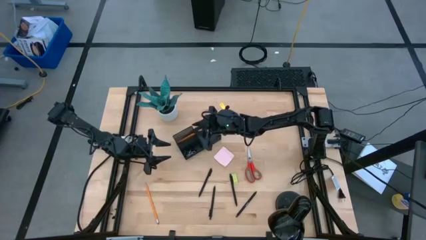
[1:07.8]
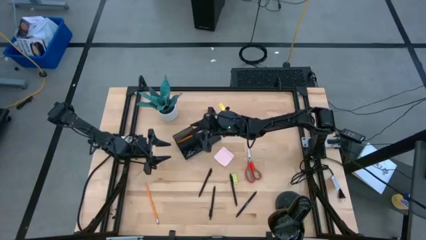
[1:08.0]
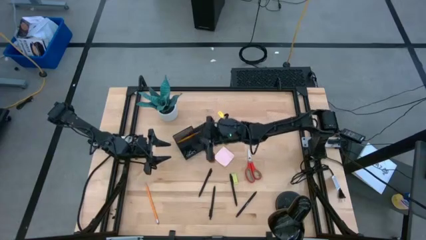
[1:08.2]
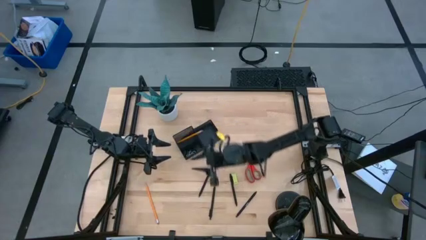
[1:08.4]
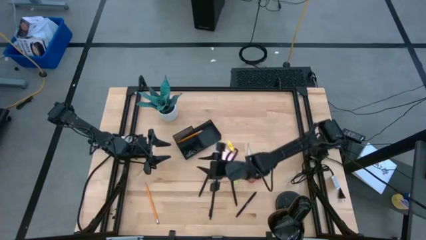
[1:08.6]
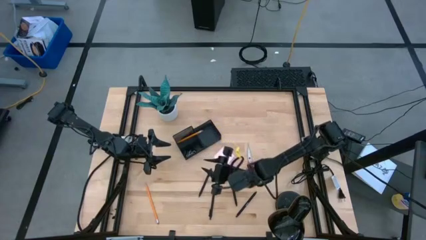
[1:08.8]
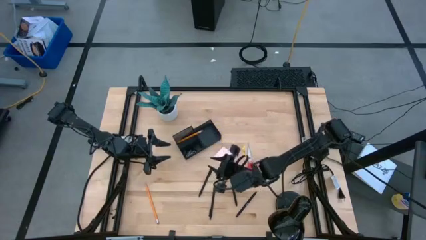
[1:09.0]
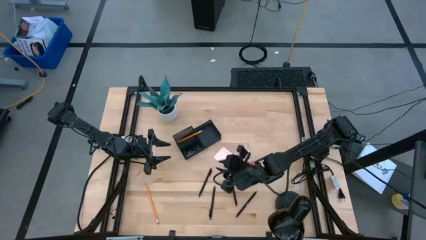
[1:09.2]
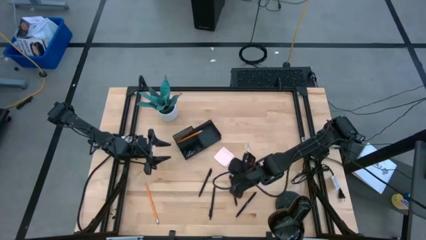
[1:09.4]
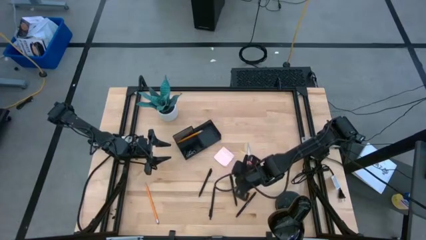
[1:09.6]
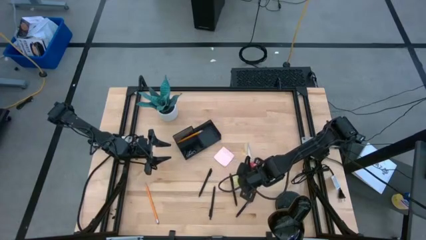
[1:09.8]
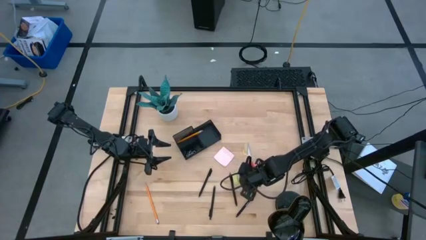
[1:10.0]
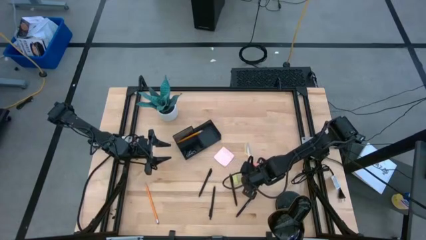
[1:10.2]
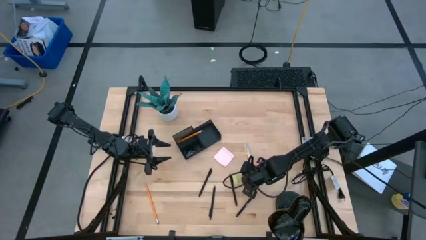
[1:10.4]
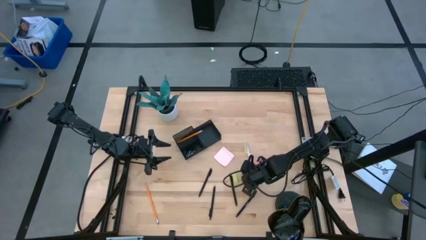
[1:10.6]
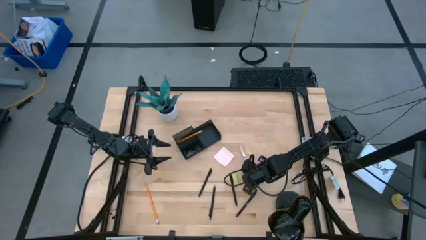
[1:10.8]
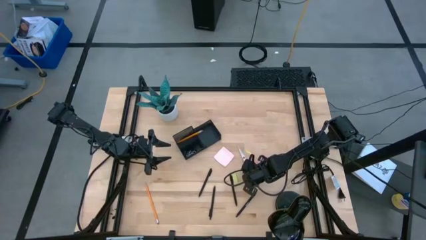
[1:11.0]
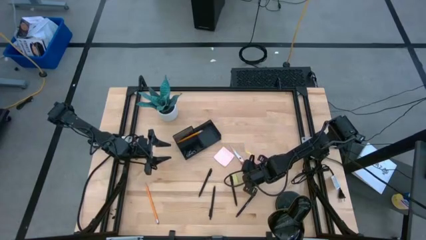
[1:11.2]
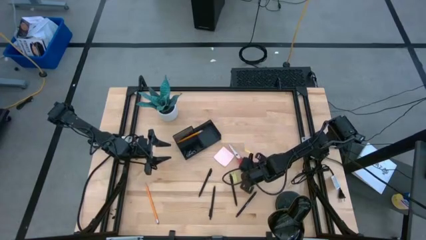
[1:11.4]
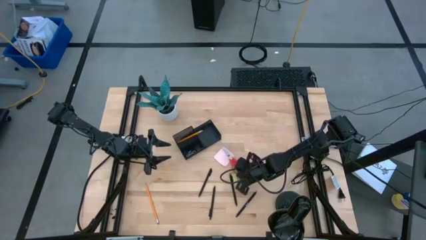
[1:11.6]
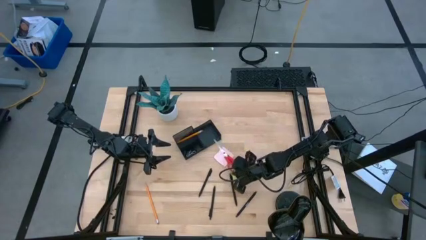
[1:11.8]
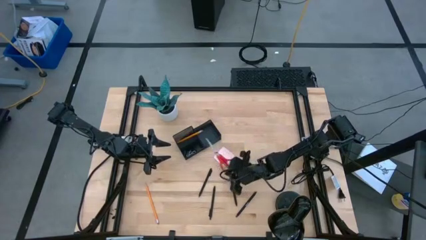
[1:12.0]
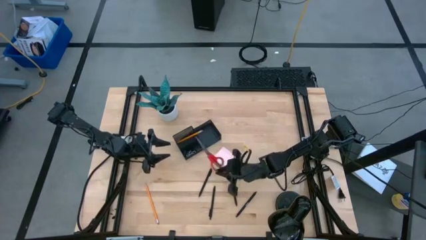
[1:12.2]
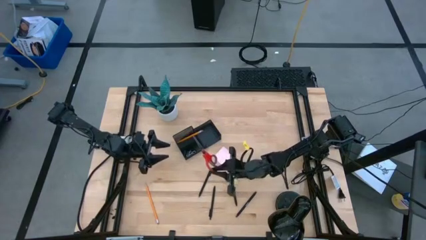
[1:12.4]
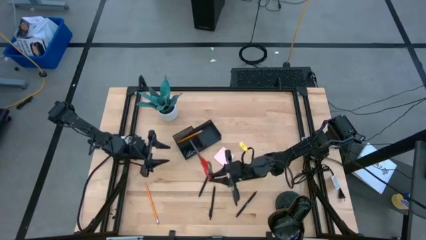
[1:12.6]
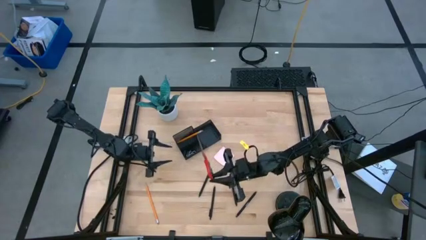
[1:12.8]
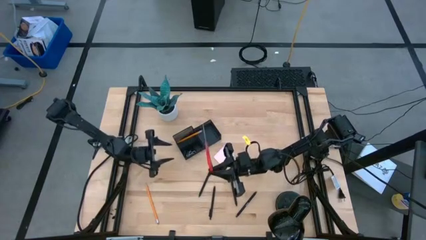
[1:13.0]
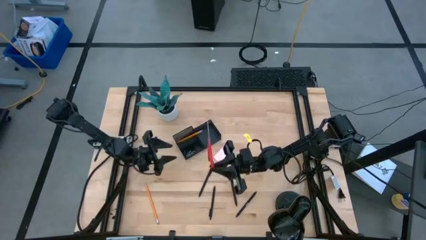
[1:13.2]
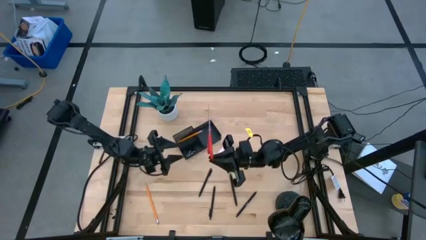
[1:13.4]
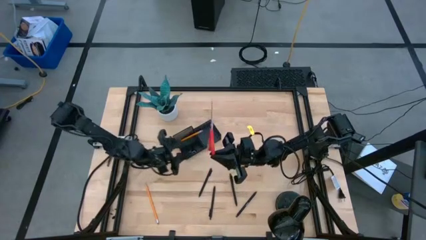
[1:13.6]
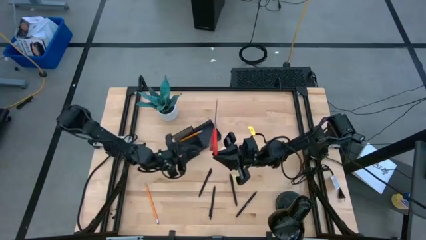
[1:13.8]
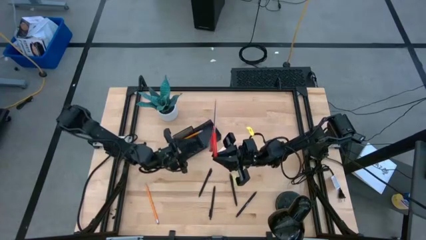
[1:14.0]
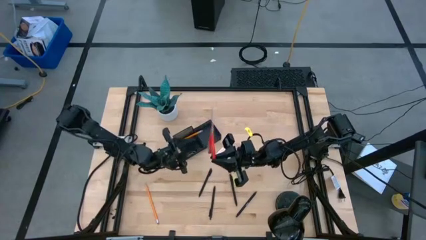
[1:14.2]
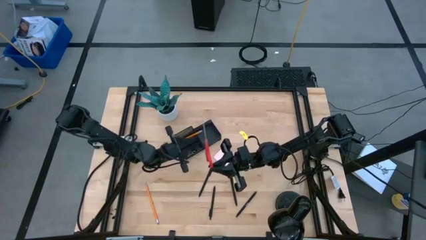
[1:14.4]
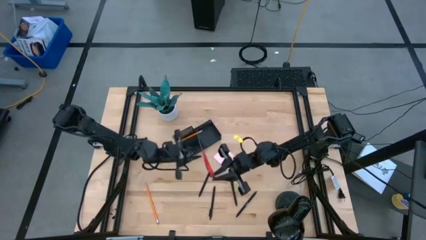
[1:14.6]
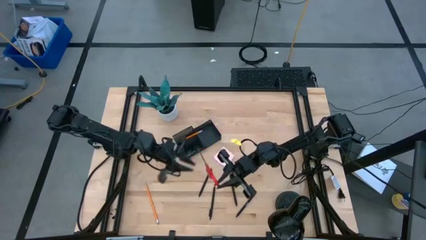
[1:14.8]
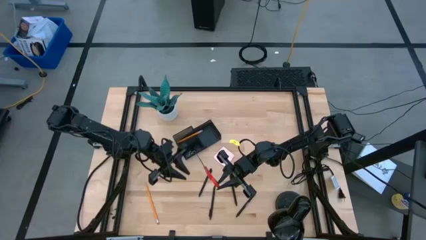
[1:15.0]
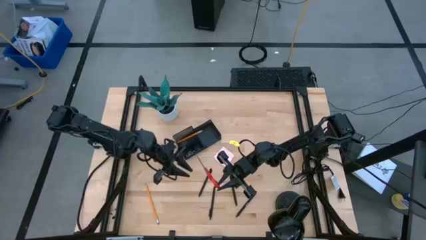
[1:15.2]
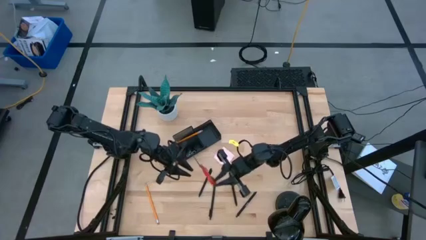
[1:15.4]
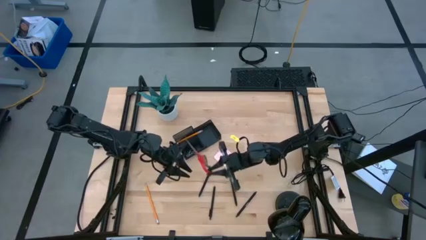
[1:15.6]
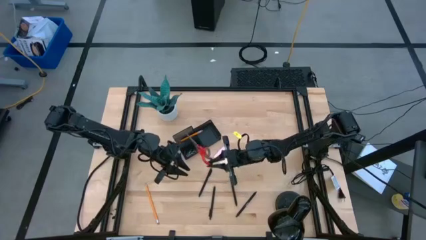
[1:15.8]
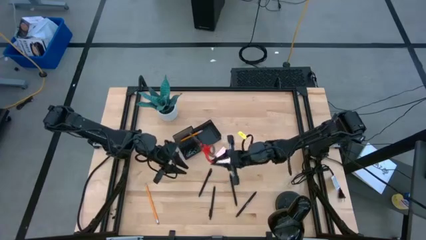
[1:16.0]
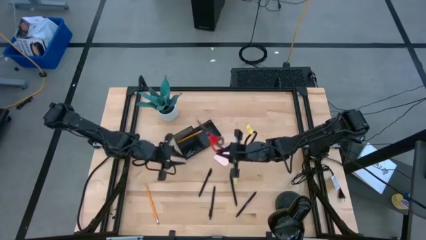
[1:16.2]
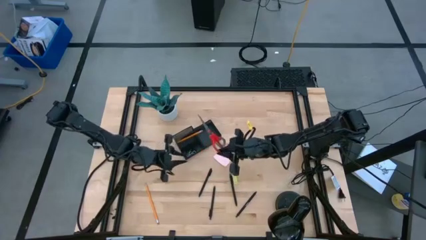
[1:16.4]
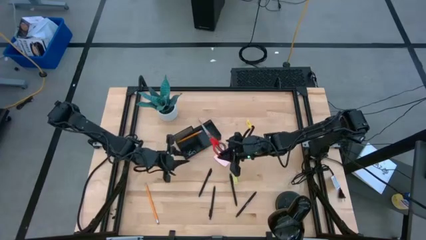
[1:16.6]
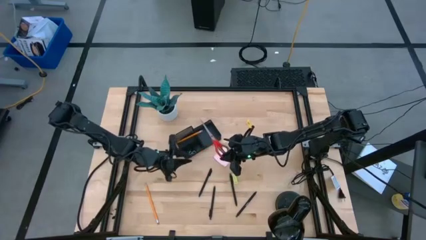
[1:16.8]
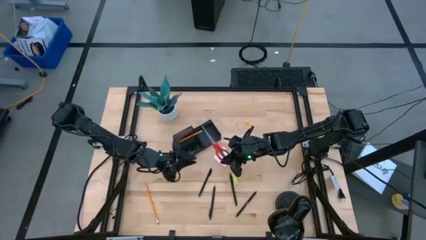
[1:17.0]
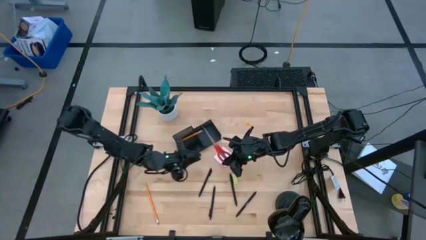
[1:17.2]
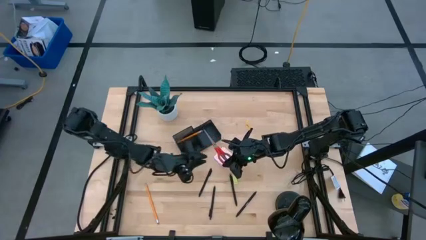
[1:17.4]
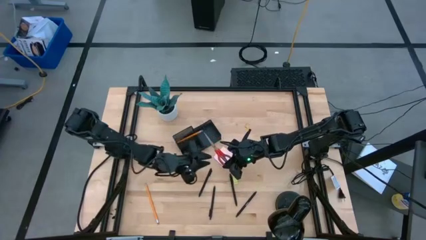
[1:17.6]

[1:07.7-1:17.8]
Task: Pick and place office supplies into organizer
Put the red scissors into the black desk organizer

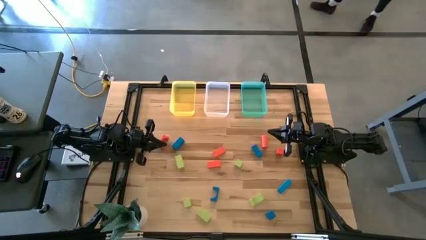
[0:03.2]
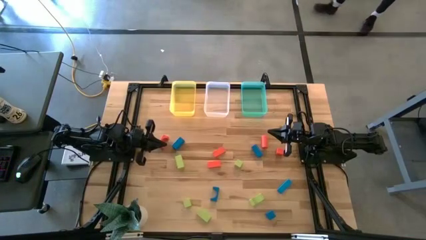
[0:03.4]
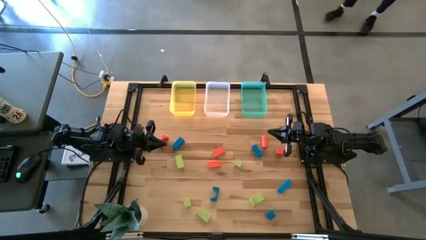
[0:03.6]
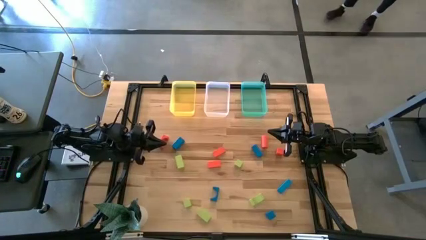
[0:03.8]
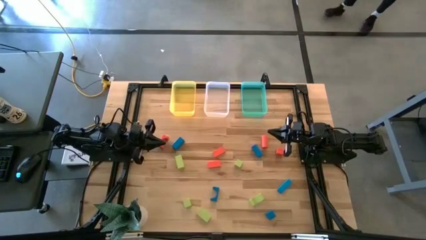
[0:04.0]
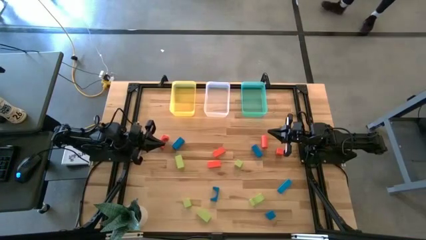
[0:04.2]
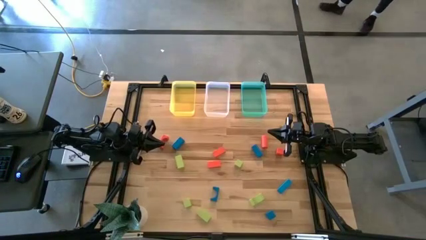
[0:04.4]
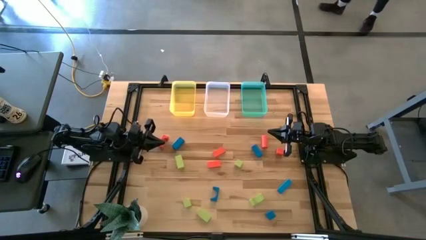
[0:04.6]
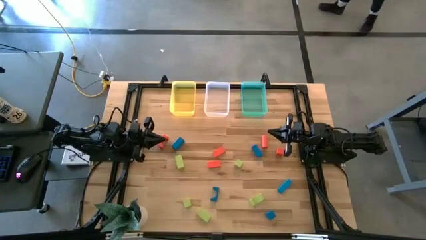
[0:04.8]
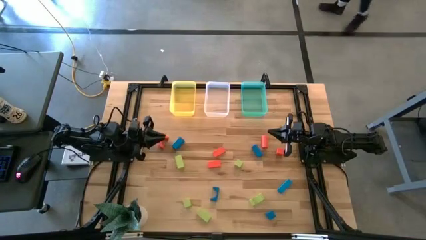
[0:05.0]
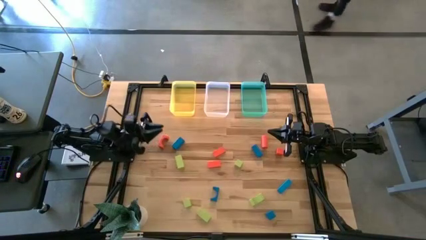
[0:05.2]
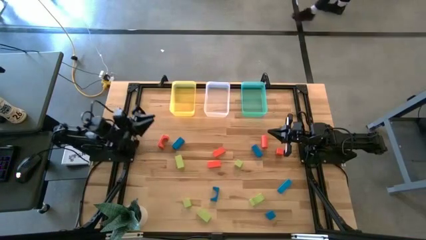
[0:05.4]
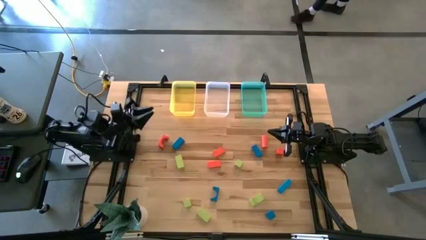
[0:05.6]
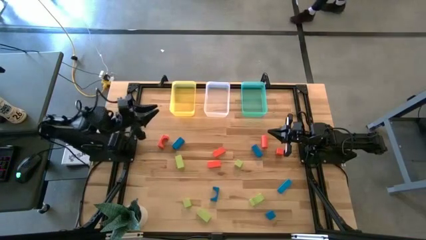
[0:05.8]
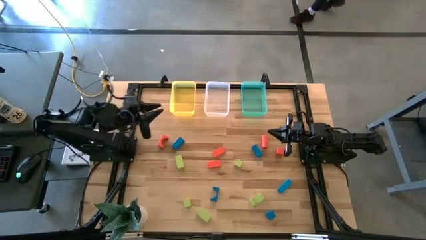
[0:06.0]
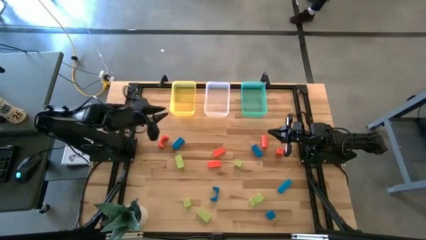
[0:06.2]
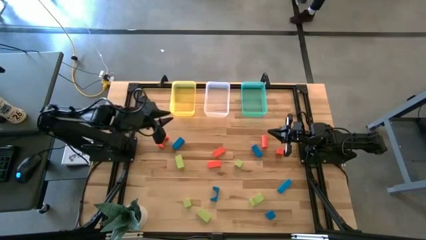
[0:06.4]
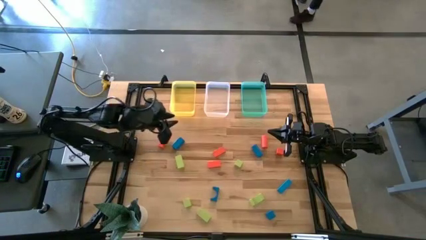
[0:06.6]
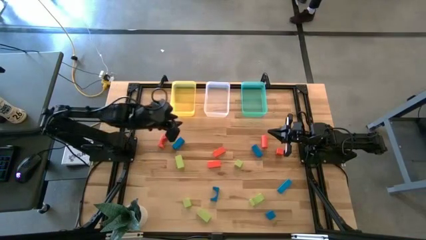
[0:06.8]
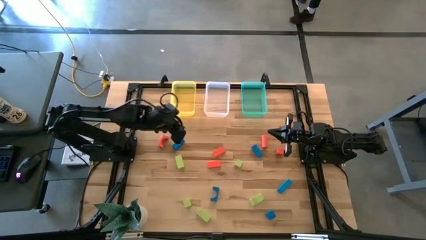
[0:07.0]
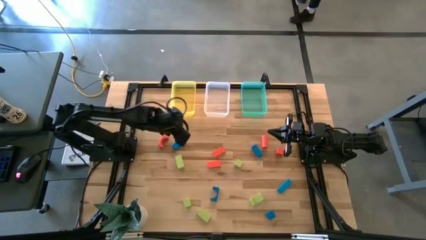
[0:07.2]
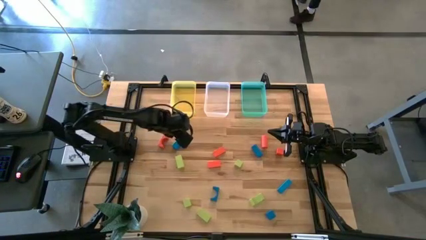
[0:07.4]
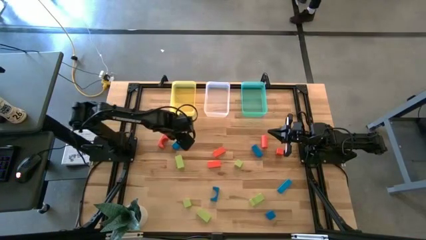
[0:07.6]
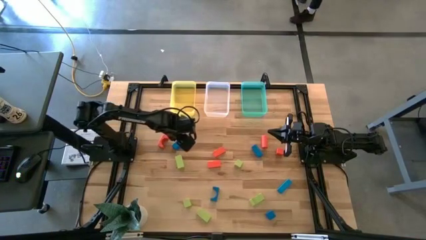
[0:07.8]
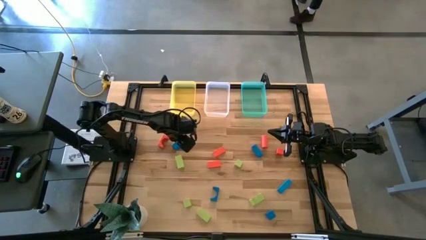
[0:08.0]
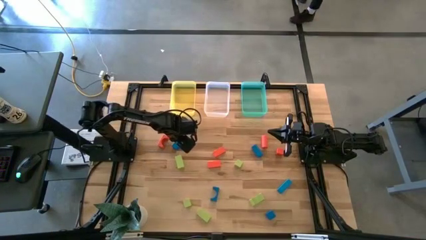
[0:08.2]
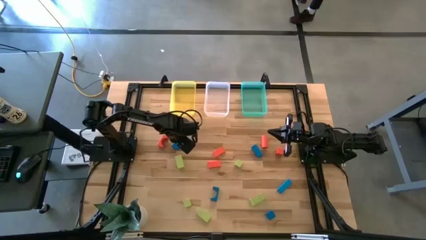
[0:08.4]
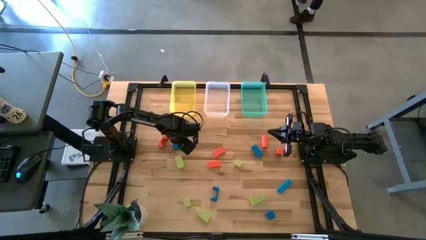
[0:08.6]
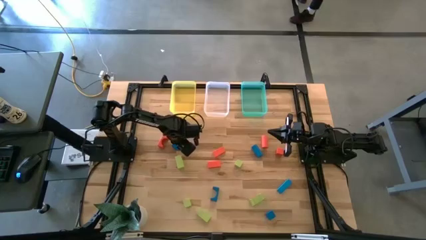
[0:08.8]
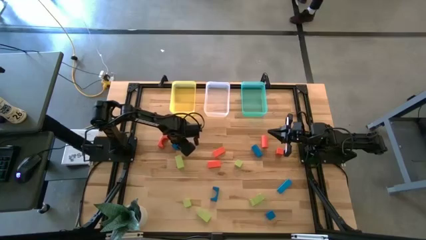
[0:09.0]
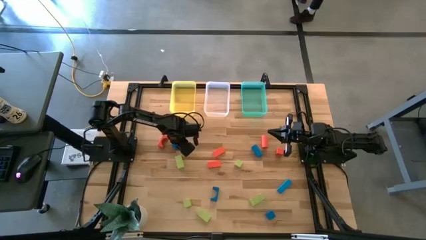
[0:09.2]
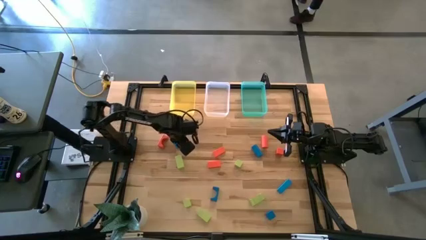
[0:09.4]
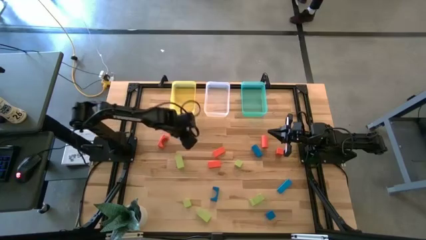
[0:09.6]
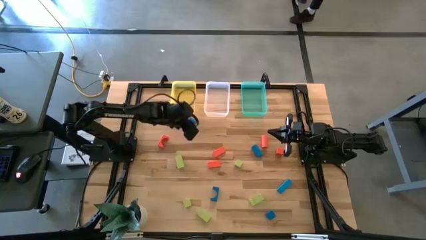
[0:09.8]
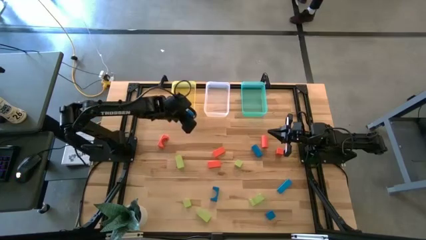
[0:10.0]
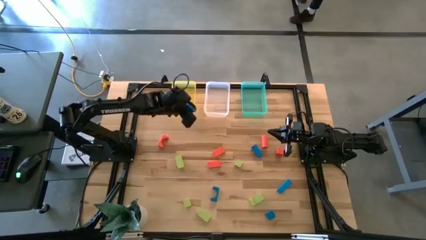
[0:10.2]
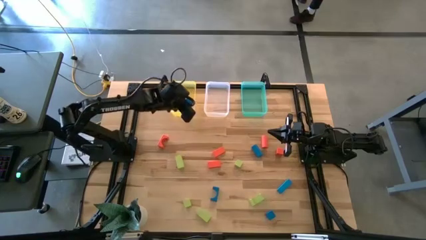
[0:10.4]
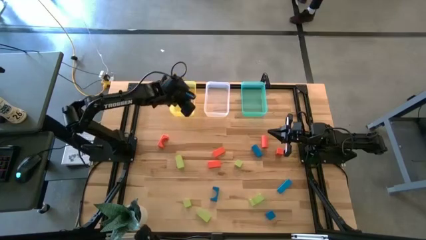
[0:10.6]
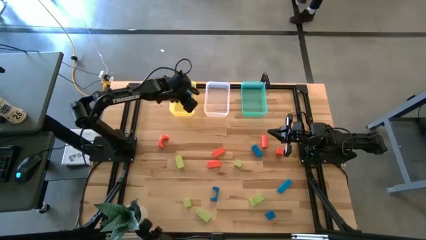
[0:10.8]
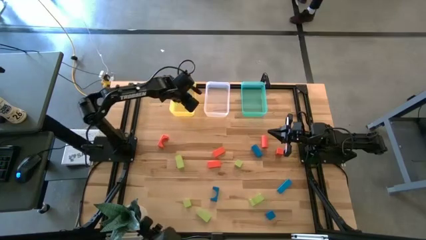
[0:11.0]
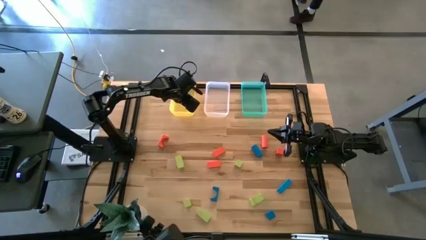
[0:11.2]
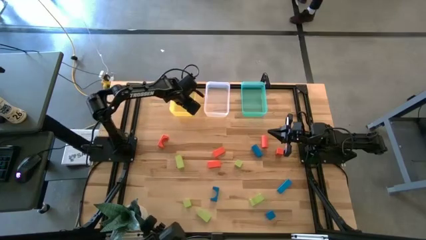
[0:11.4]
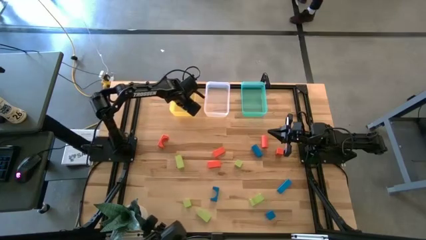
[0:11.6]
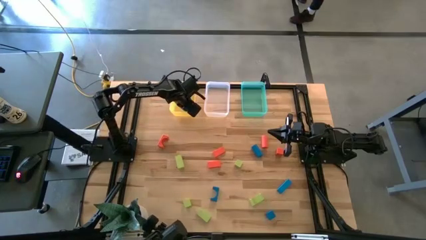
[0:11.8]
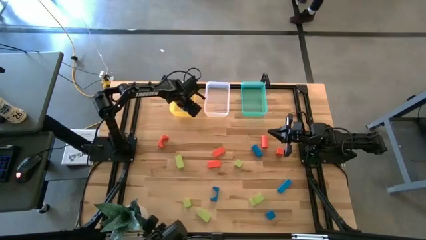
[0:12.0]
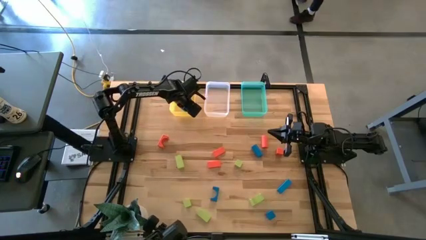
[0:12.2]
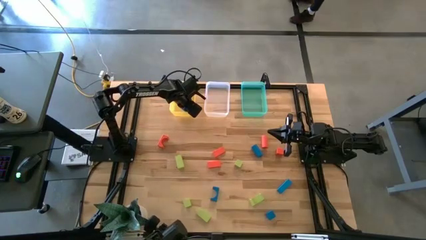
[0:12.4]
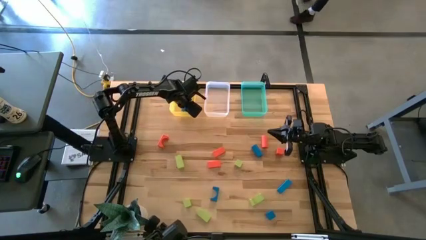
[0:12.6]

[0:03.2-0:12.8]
Task: Sort & place blocks by color
Put the blue block into the yellow bin
